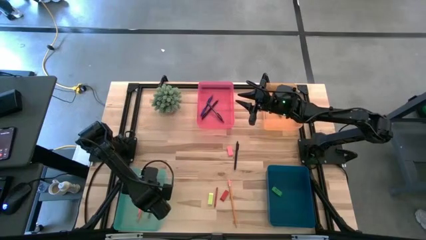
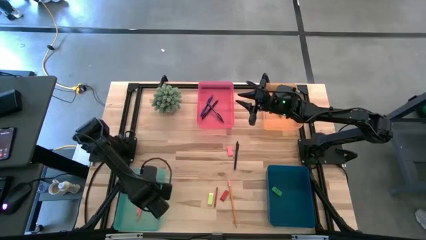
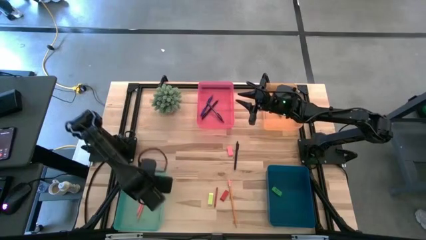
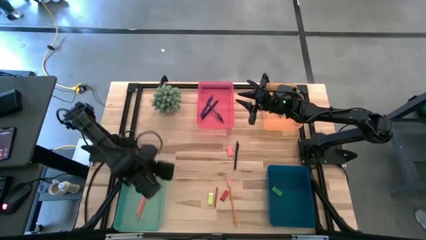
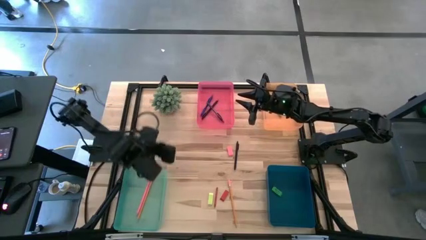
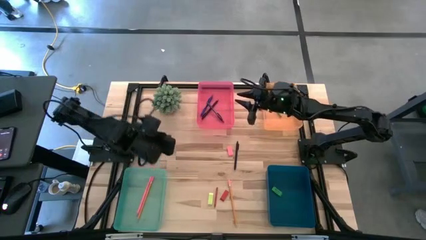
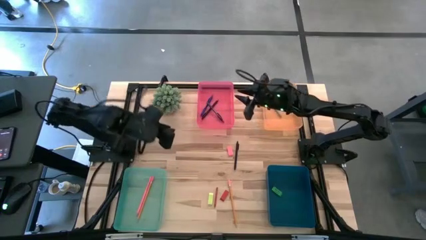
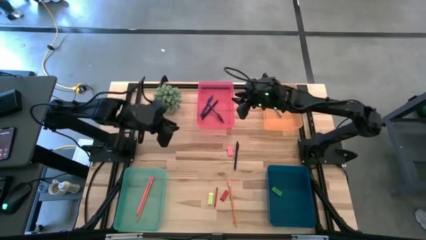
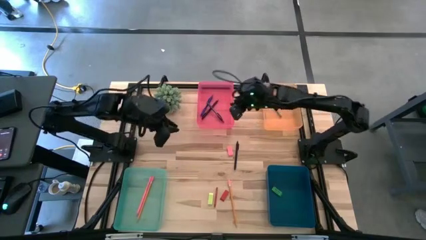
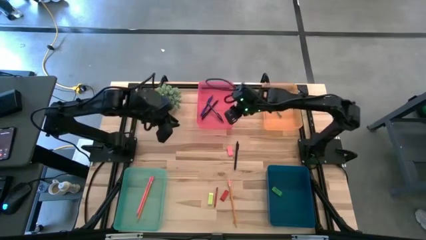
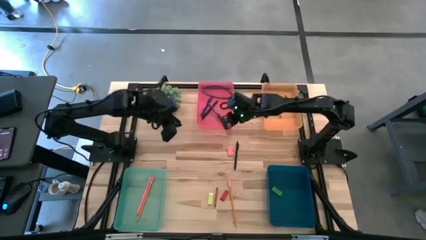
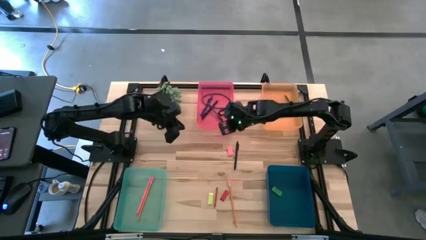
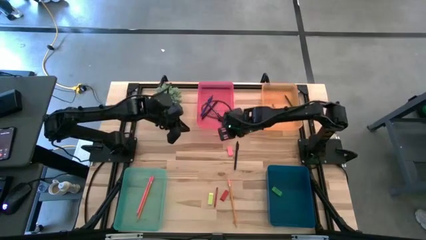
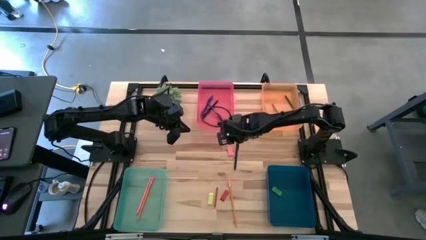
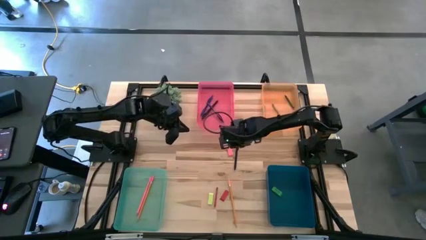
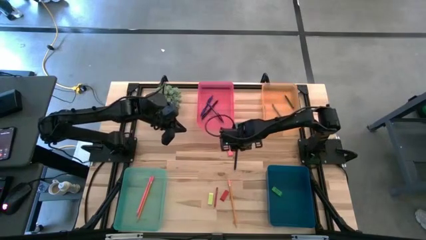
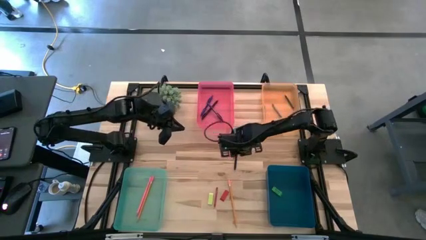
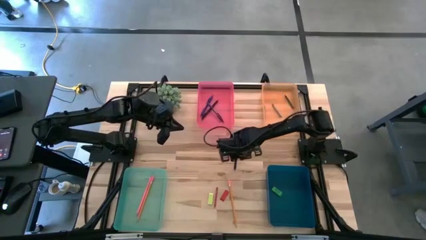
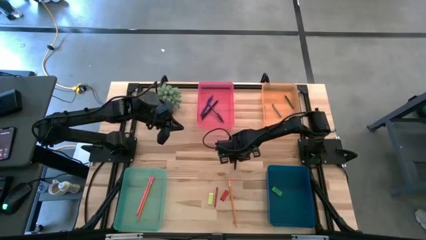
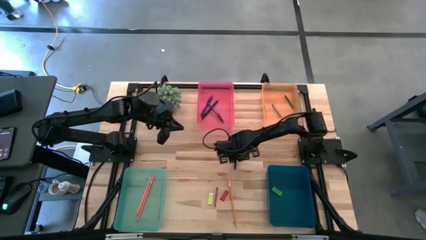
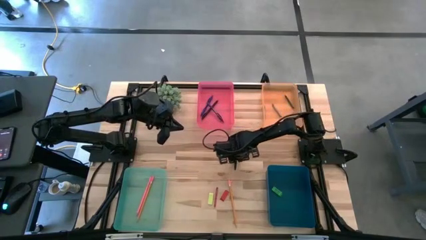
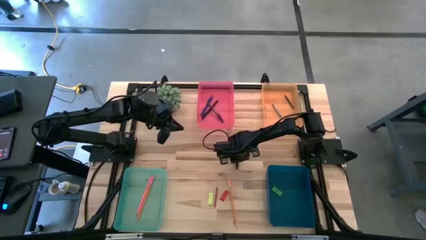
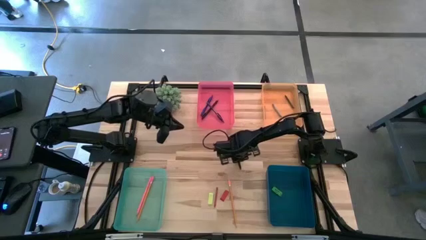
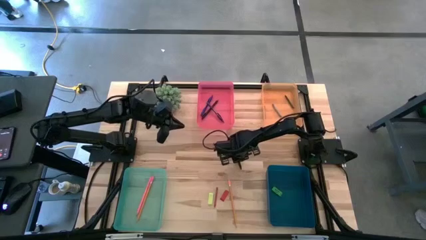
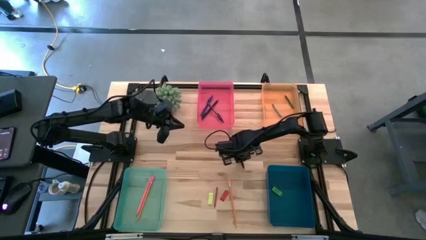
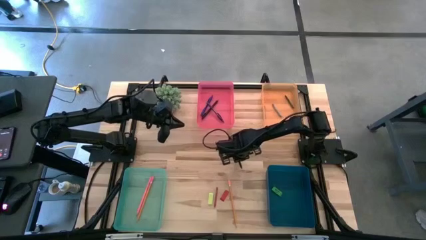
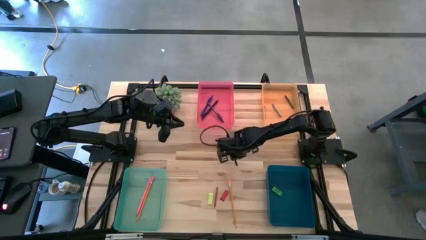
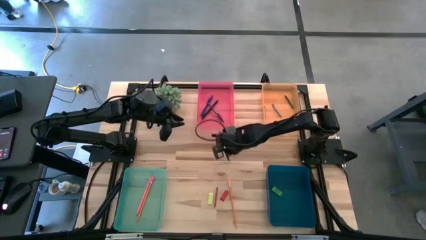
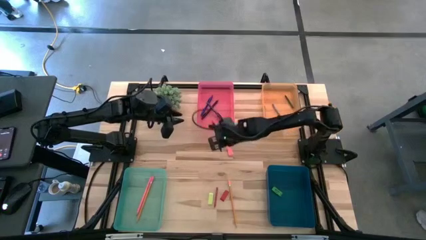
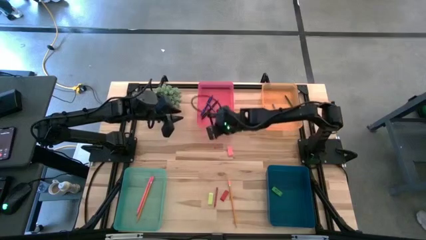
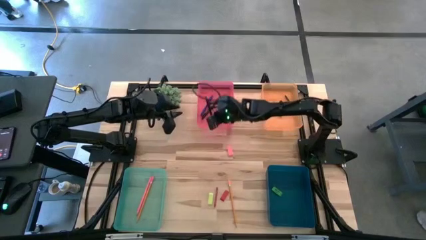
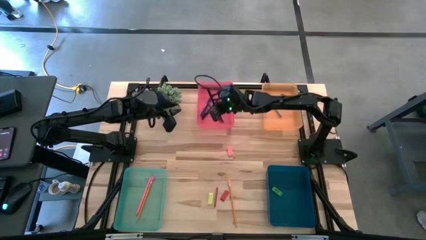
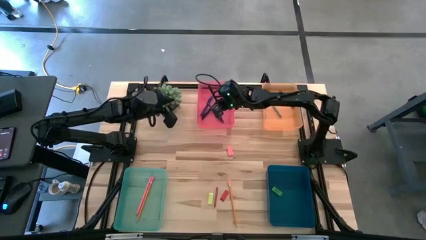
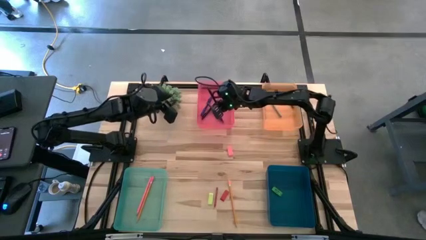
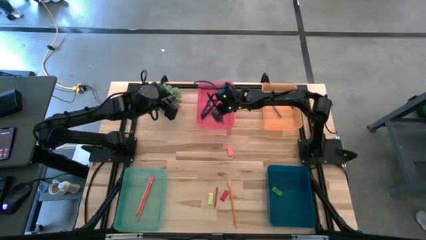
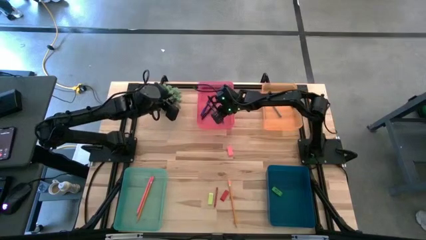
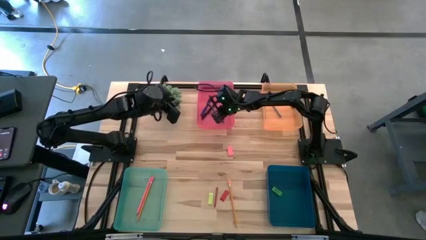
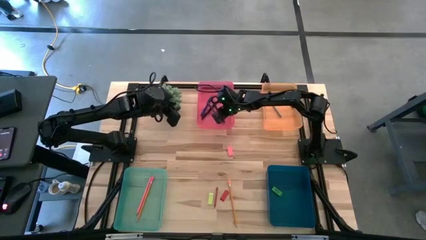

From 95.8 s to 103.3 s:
Task: Sort crayons/erasers/pens/pencils in bins
Put the black pen into the red bin

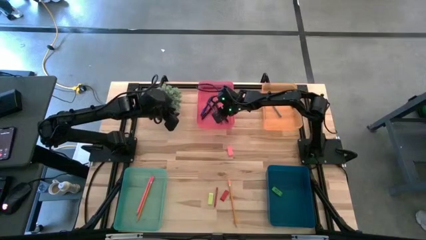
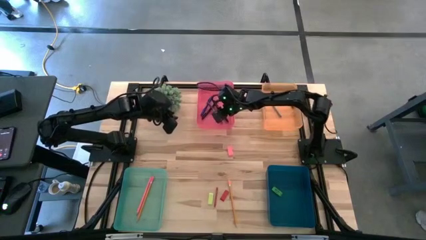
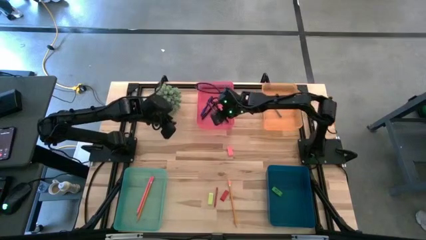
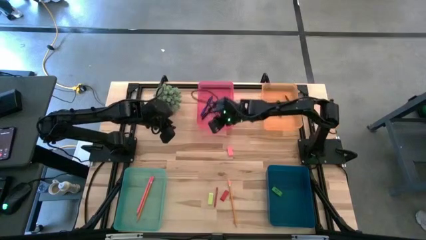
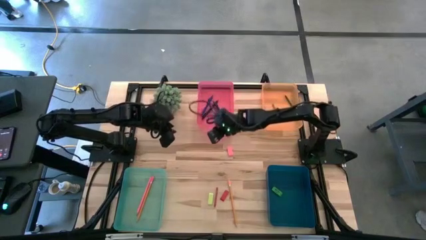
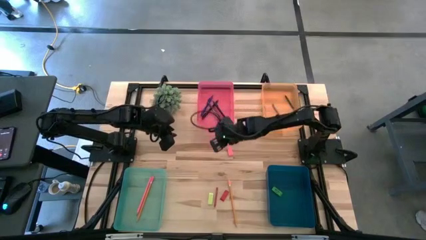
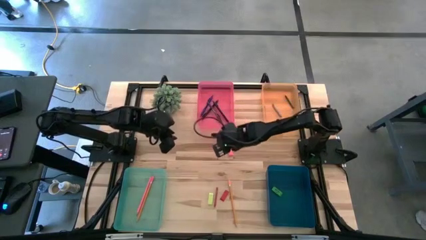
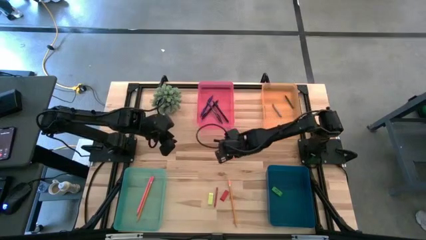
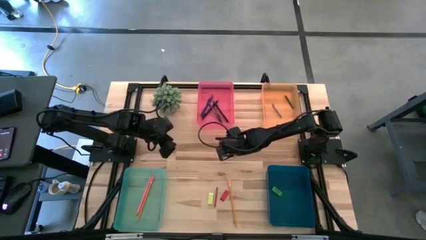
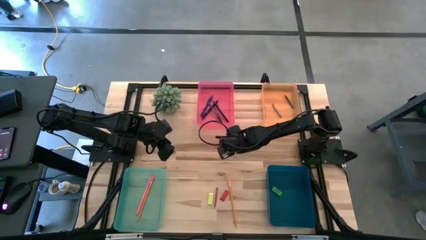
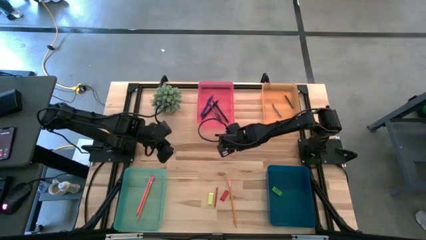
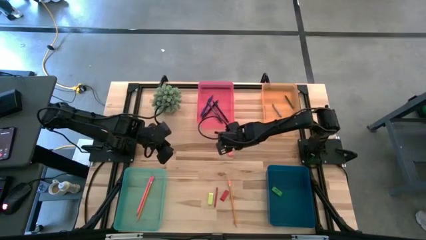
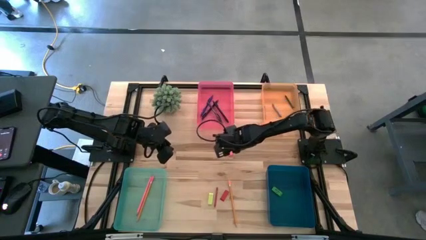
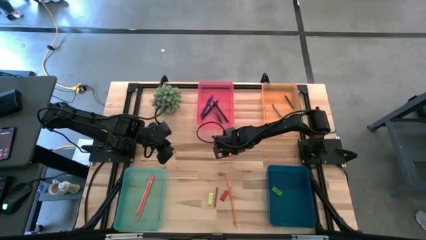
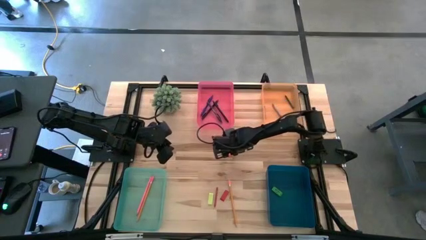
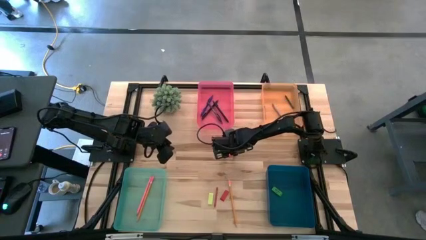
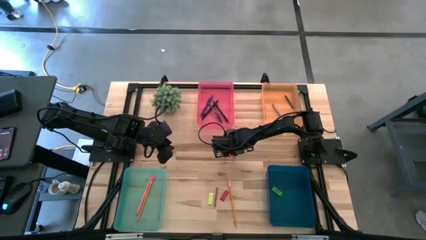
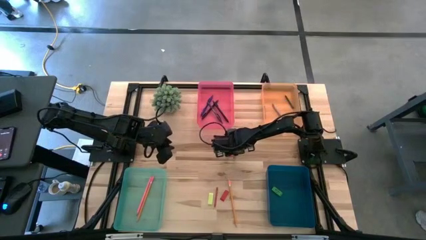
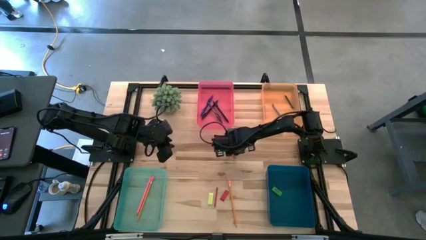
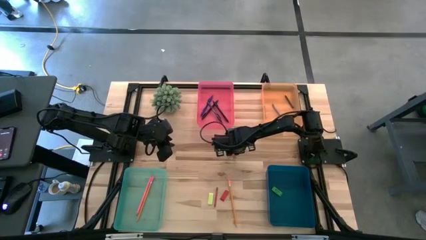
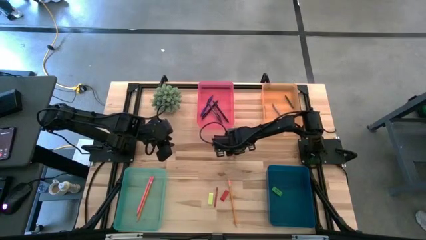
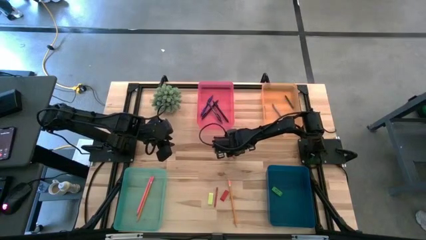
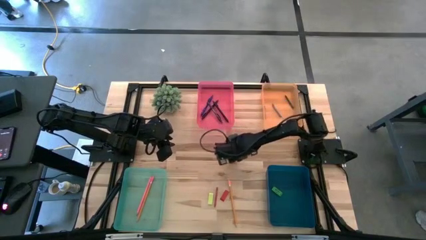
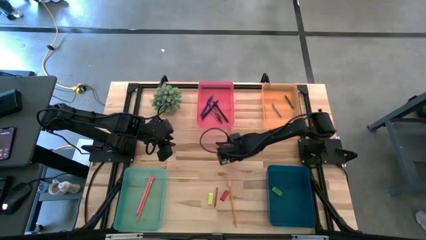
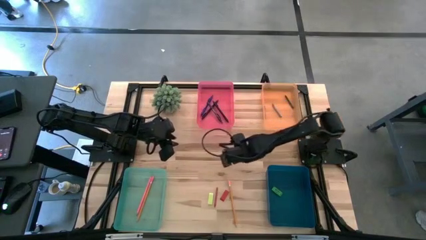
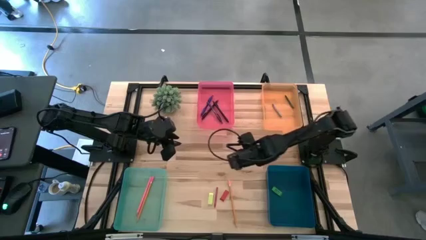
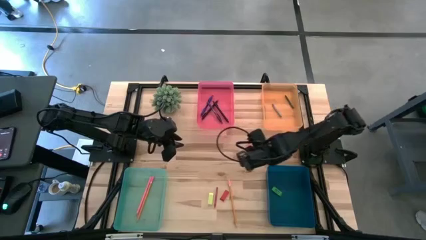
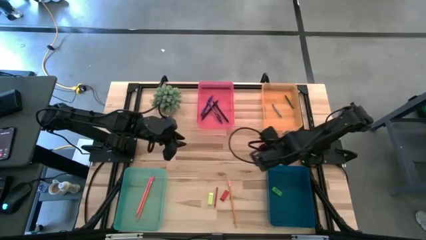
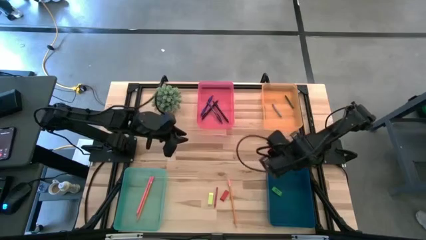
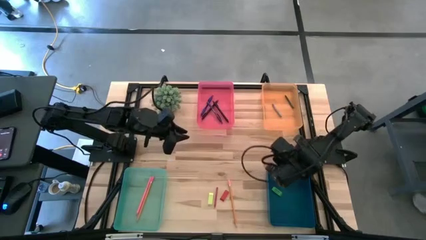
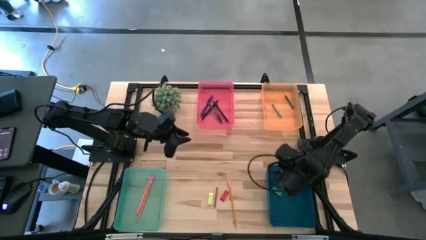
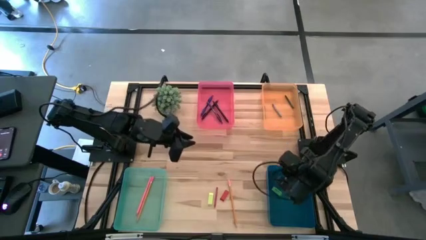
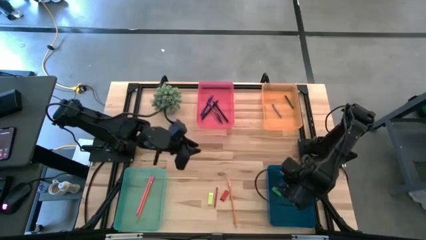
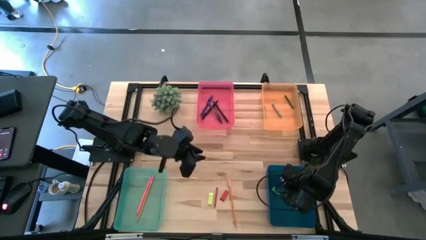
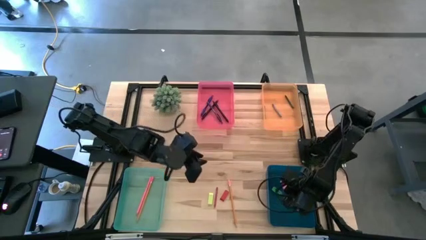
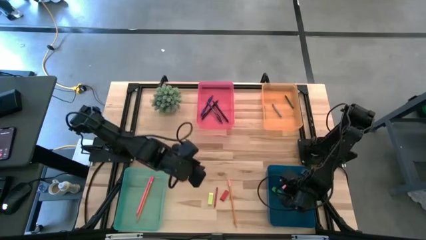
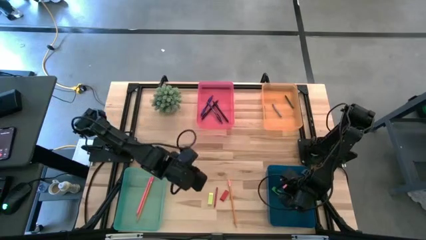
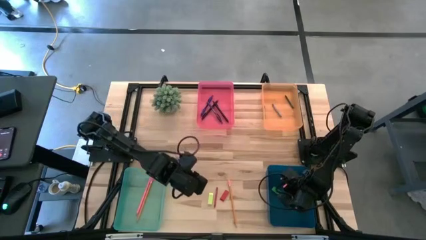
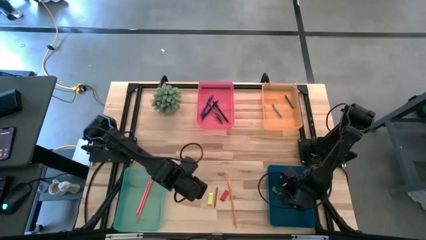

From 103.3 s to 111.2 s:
Put the pink eraser into the blue bin
